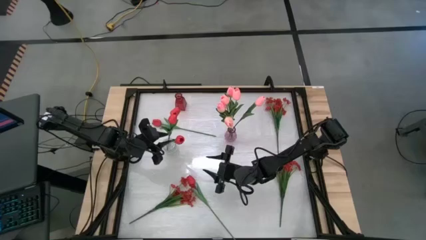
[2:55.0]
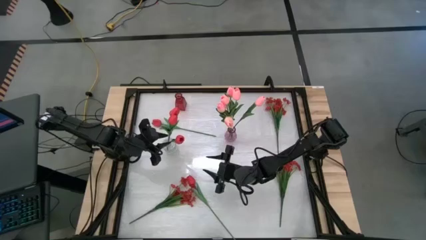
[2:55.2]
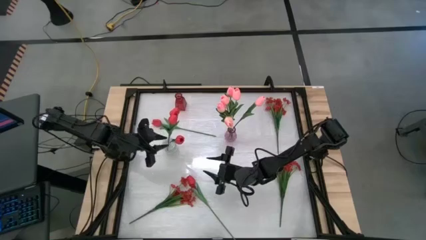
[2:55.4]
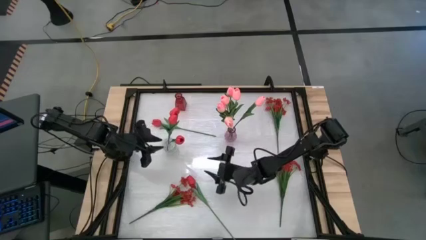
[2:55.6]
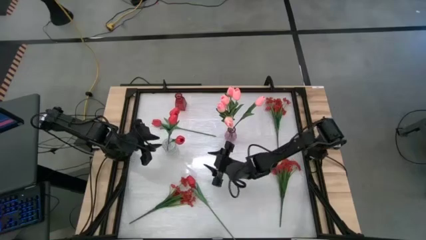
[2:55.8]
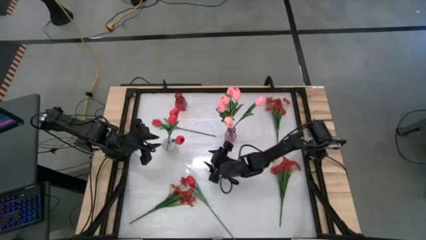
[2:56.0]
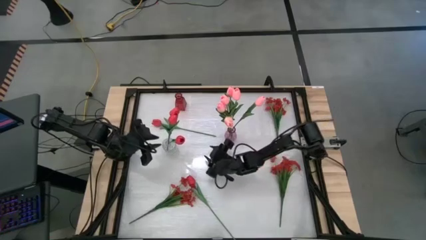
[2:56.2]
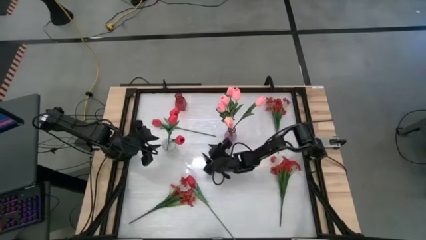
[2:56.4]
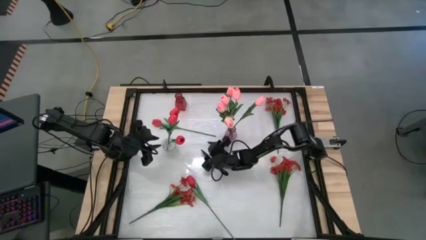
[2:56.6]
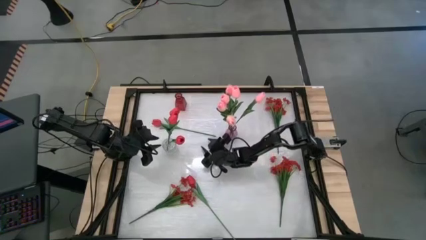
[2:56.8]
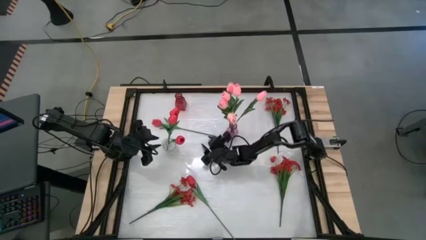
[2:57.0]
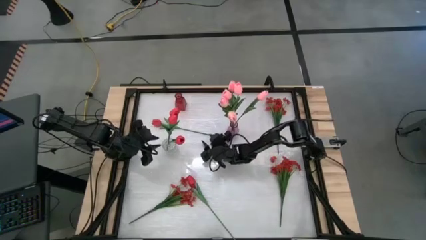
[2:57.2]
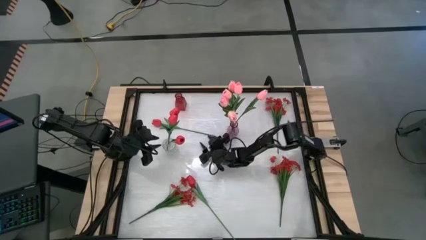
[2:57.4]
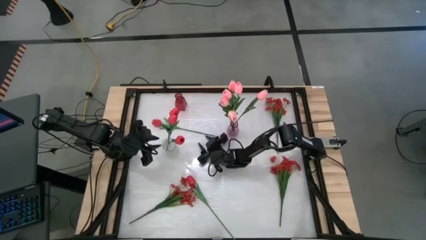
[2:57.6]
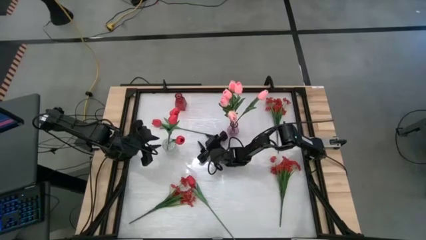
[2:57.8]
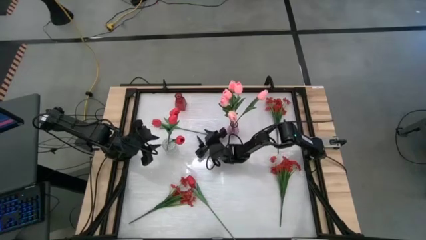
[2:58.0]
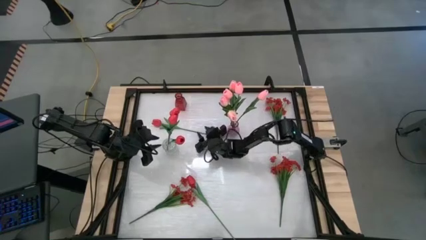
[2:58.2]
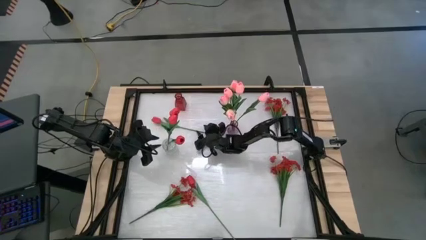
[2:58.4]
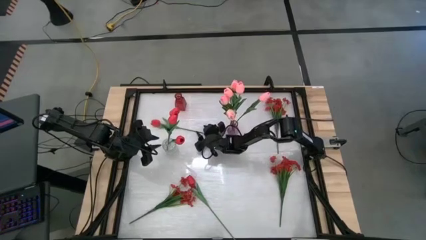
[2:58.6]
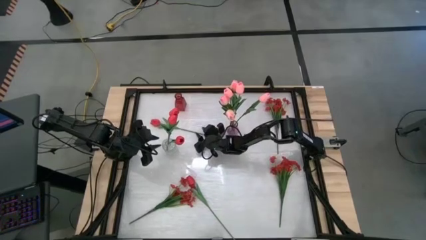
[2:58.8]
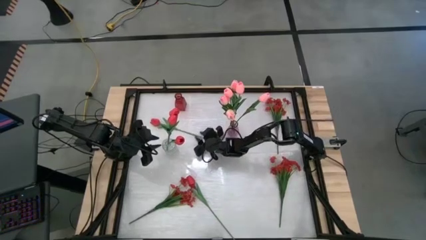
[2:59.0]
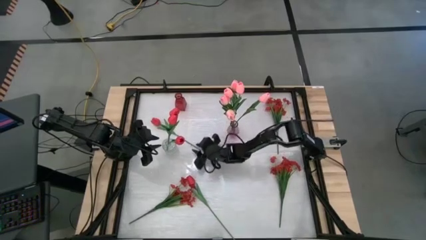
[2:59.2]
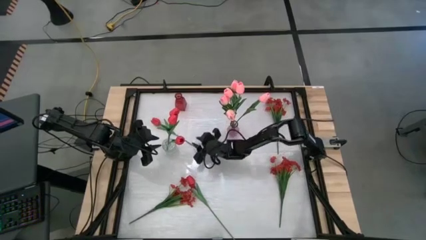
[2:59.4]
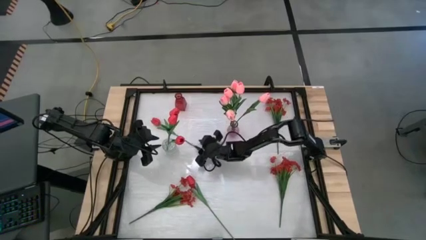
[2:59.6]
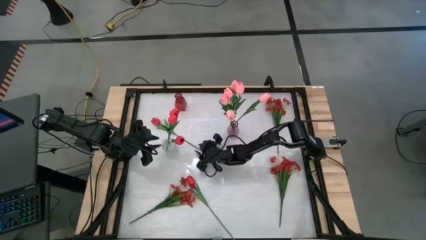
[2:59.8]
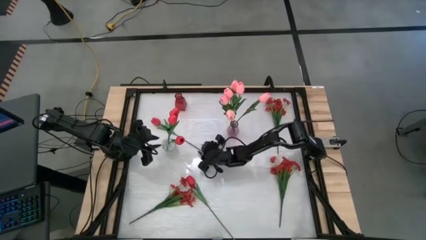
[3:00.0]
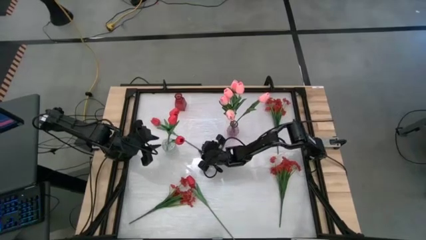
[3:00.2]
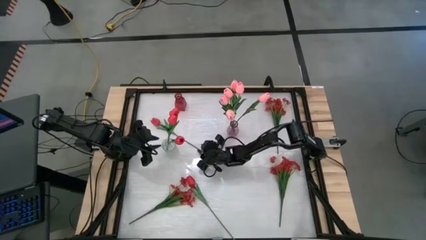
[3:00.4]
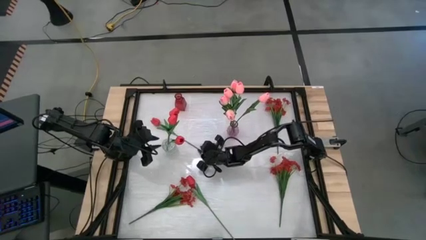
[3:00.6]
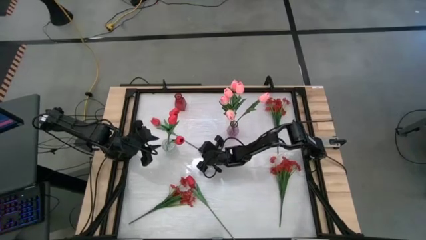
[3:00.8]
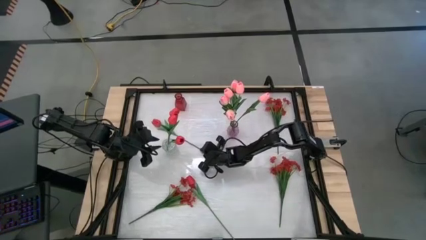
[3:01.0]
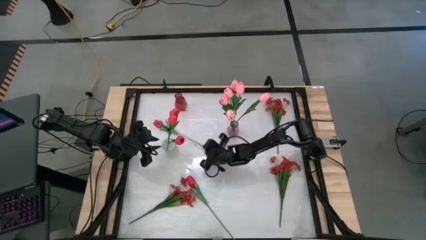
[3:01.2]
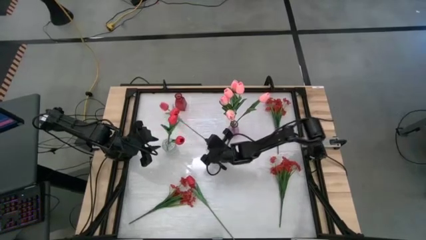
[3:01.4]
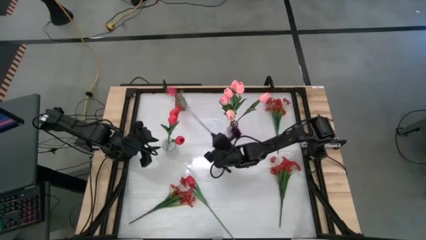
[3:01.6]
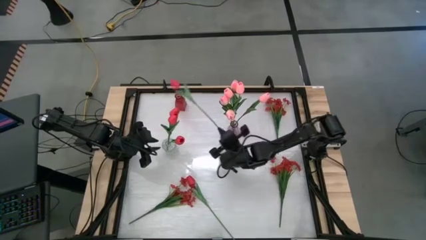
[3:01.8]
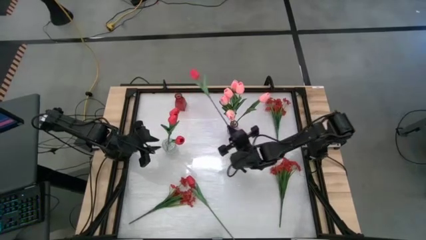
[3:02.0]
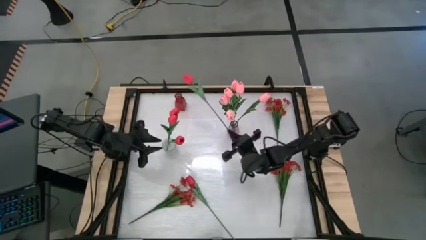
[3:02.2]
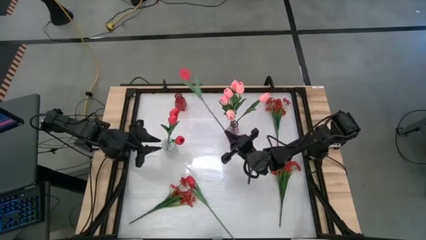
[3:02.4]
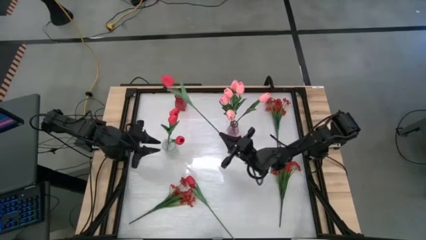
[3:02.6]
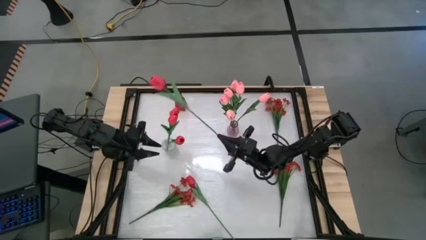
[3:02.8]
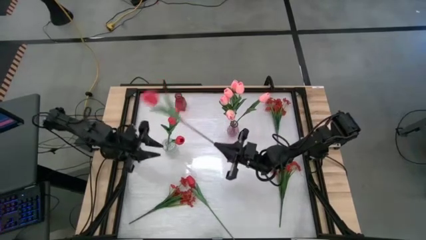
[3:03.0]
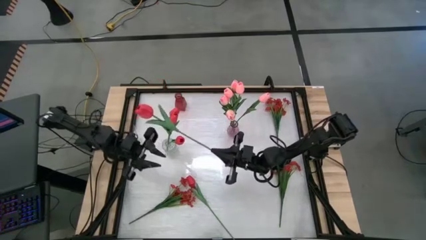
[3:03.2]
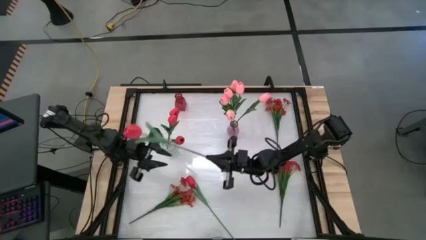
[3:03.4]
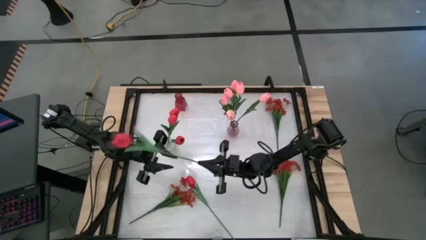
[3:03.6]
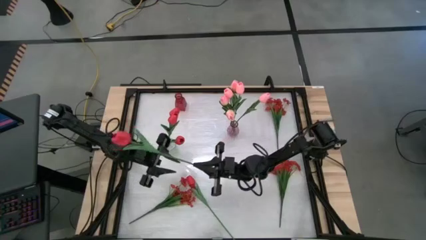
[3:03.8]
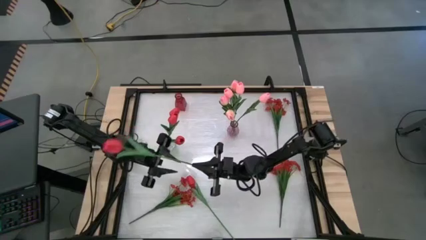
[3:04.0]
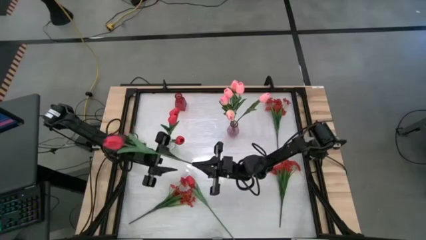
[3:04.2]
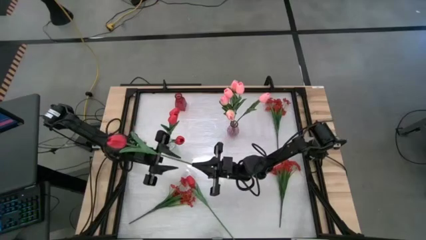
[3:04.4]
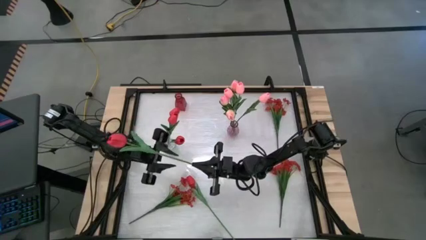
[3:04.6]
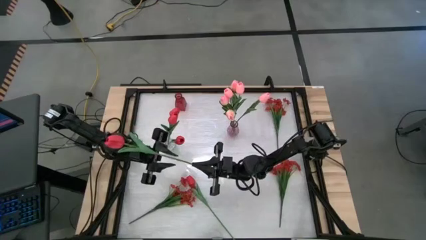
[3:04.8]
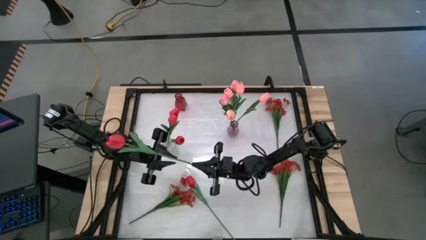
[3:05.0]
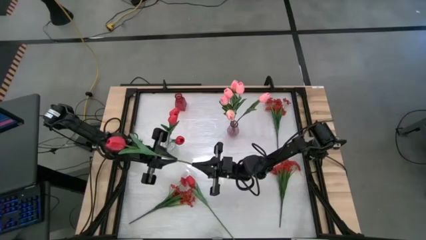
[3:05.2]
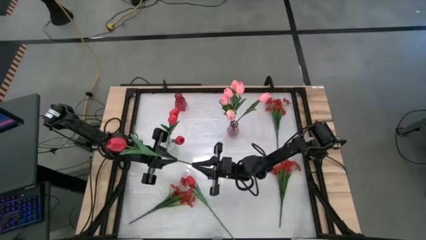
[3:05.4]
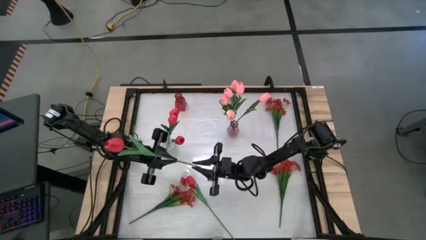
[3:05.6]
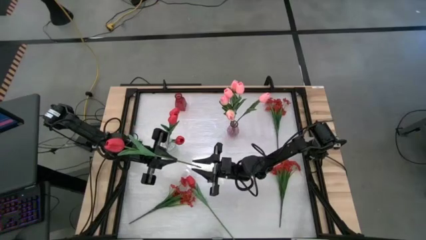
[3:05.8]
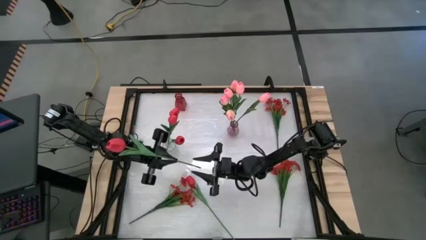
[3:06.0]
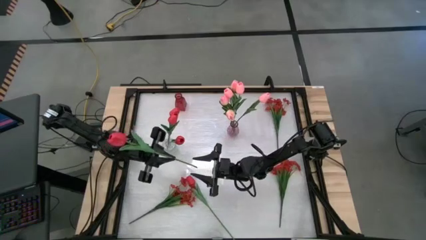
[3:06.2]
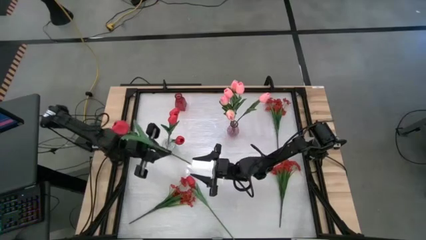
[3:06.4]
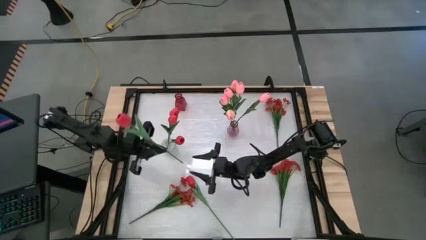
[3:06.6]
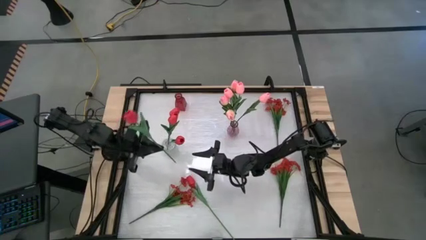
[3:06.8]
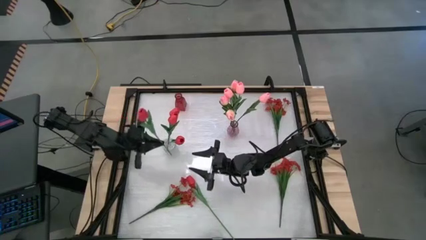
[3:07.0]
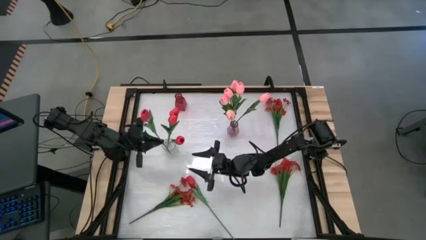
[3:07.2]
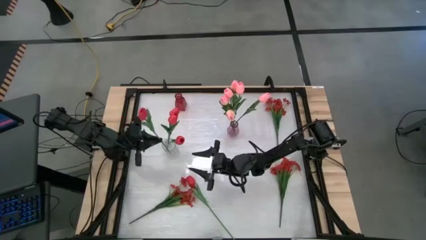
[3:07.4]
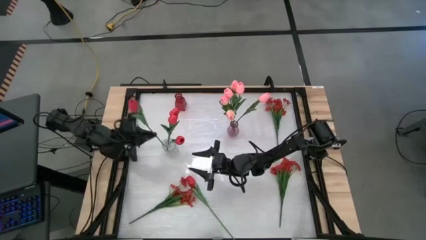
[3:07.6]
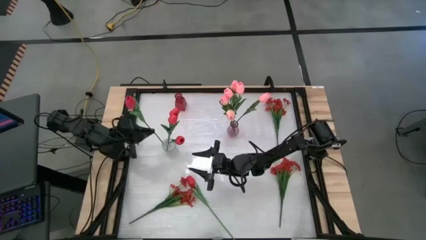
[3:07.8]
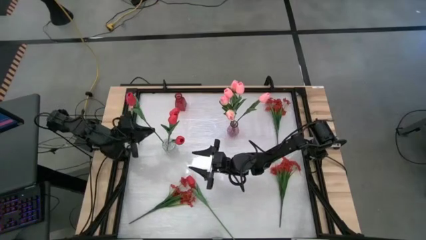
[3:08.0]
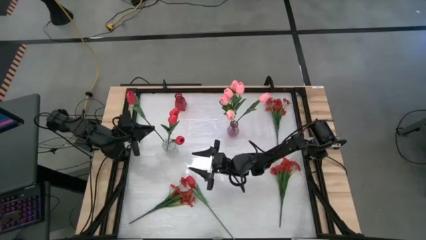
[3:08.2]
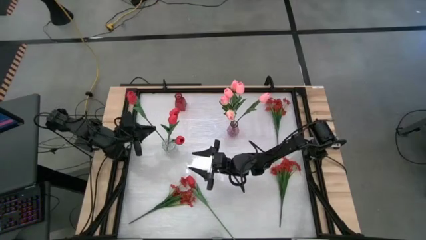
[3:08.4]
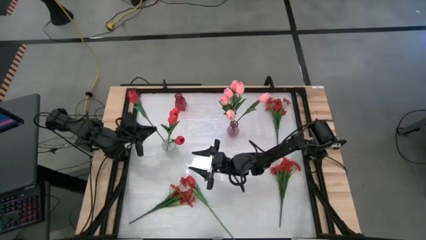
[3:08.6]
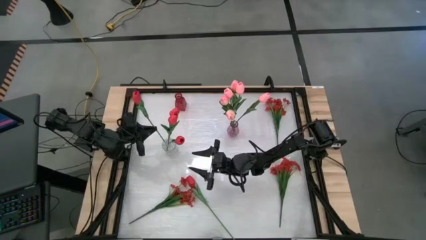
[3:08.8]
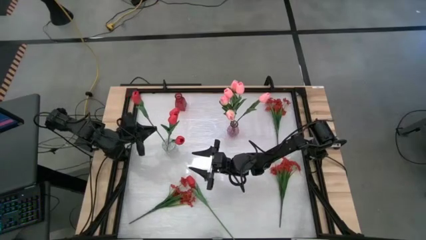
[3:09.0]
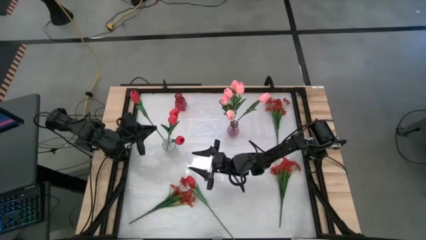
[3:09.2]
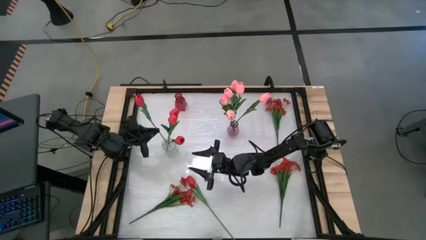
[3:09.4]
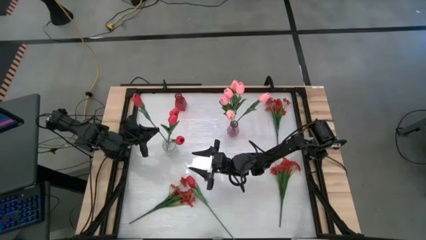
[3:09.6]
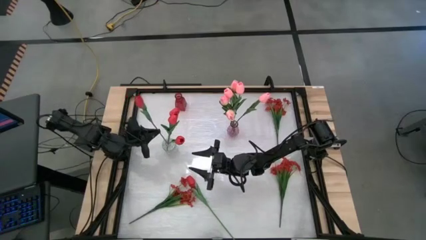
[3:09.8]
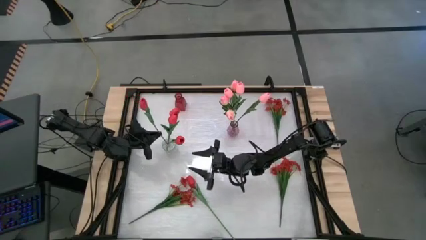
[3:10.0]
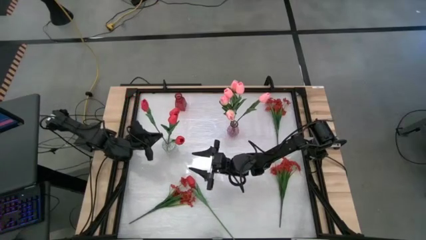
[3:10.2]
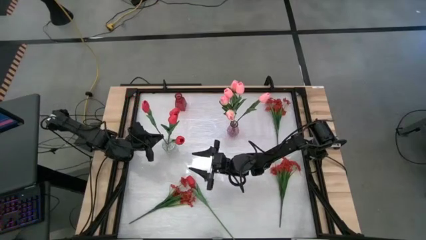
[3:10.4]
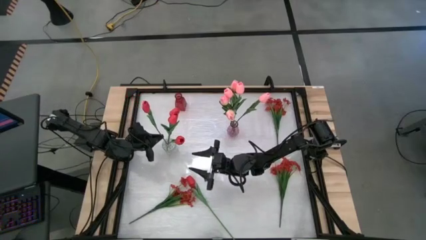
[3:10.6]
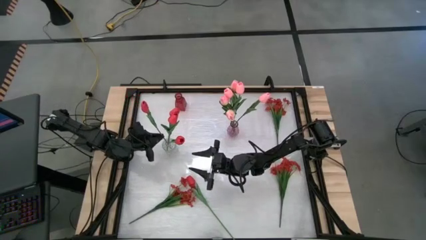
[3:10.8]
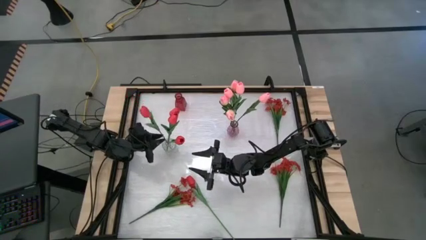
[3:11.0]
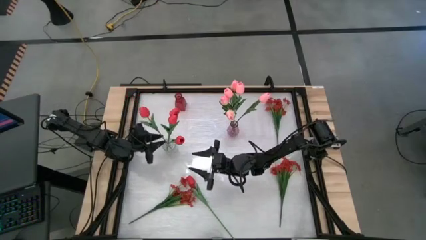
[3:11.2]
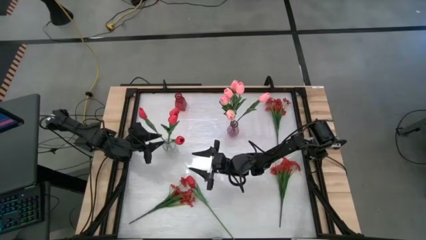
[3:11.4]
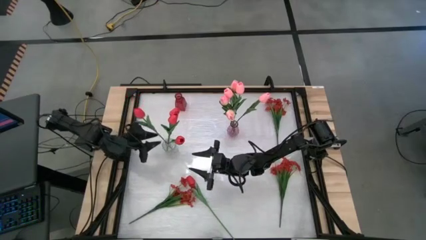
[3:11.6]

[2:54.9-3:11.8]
Task: Sort flowers into vase by color
Put the red tulip into the transparent vase
